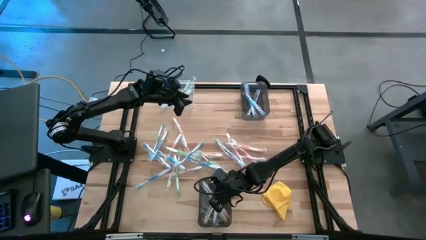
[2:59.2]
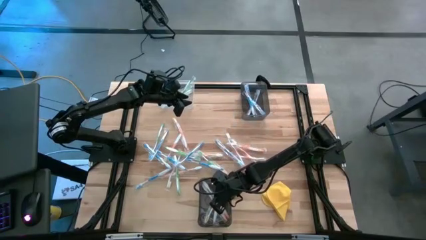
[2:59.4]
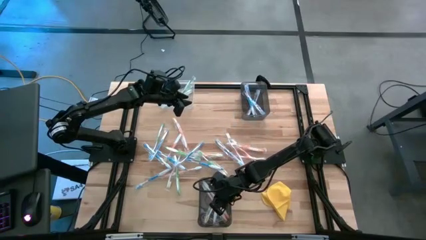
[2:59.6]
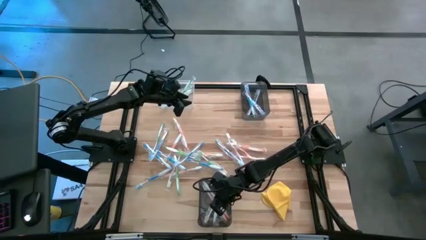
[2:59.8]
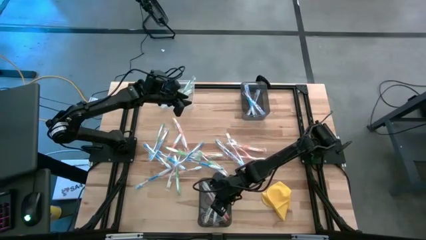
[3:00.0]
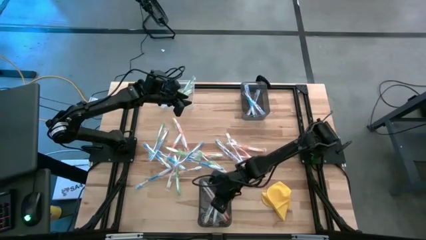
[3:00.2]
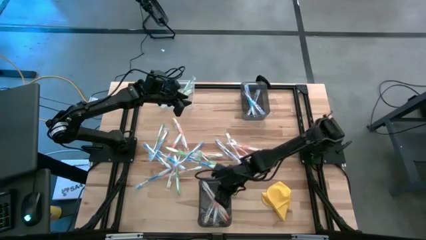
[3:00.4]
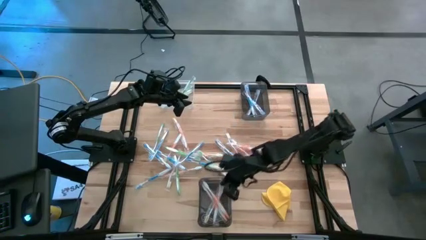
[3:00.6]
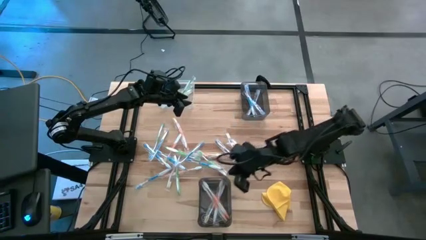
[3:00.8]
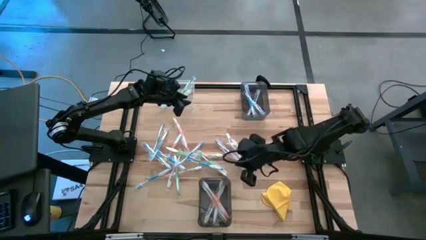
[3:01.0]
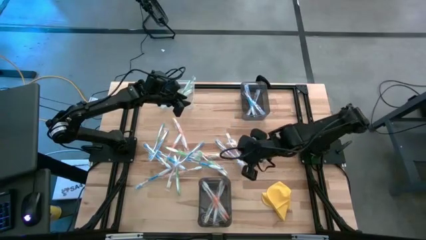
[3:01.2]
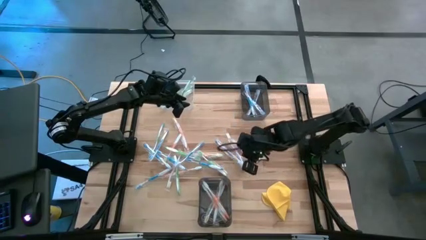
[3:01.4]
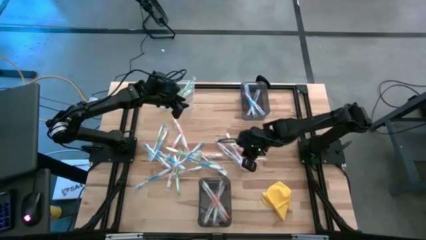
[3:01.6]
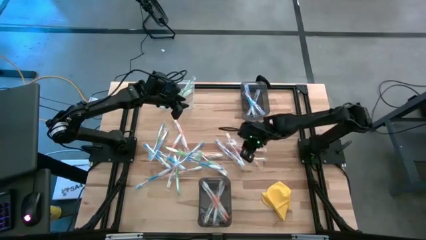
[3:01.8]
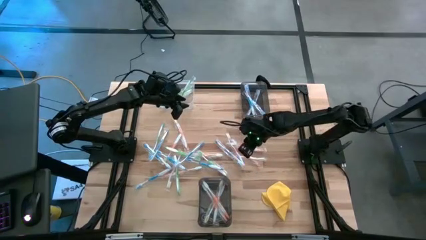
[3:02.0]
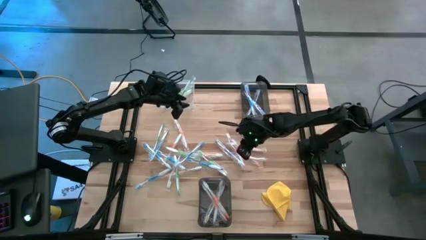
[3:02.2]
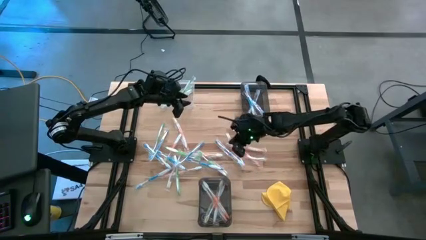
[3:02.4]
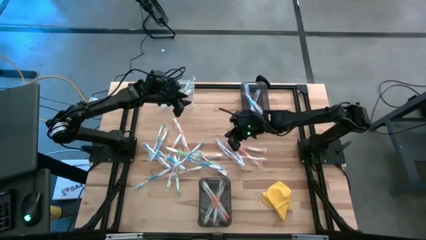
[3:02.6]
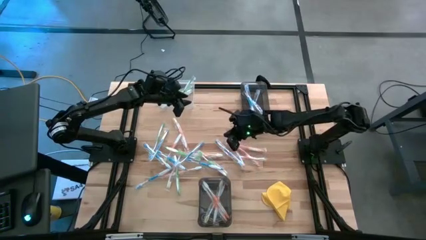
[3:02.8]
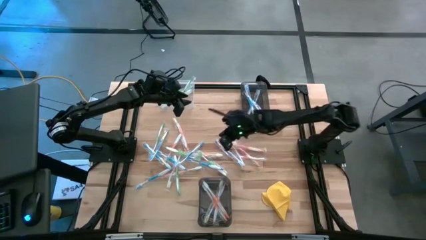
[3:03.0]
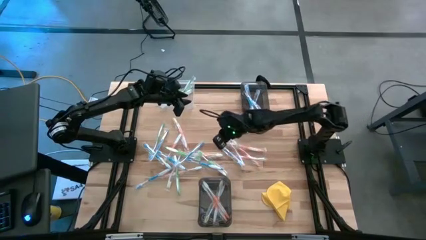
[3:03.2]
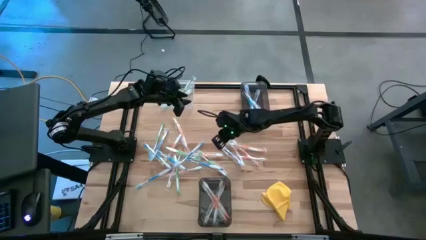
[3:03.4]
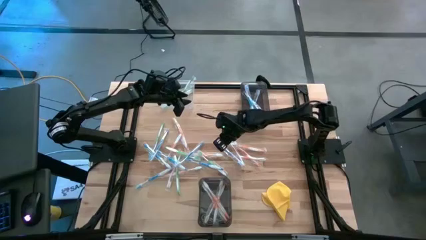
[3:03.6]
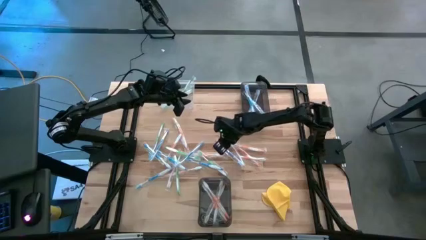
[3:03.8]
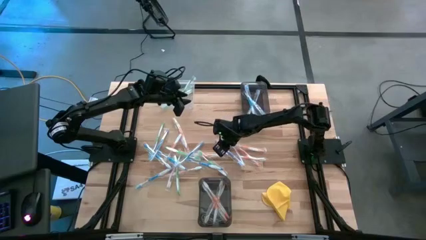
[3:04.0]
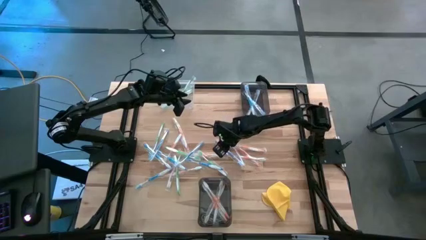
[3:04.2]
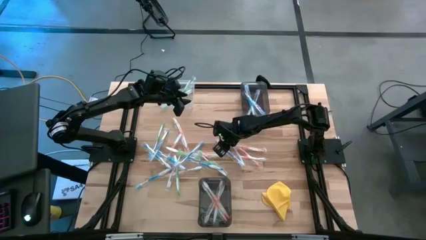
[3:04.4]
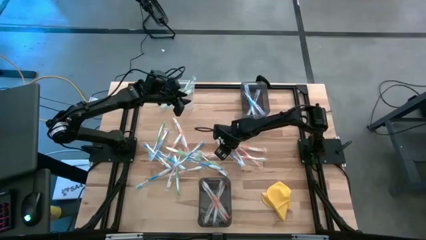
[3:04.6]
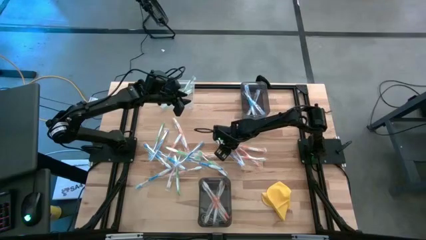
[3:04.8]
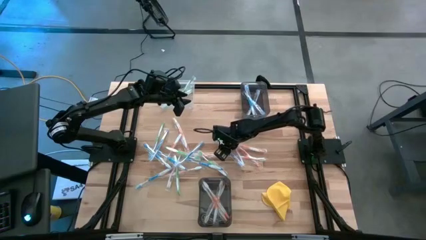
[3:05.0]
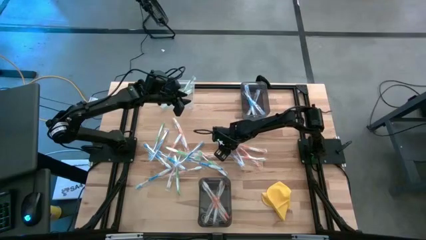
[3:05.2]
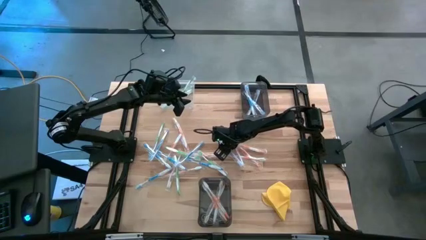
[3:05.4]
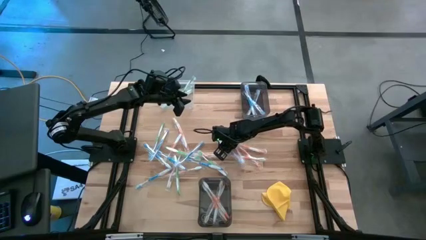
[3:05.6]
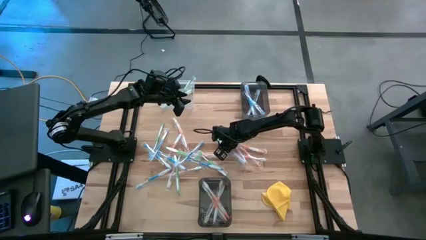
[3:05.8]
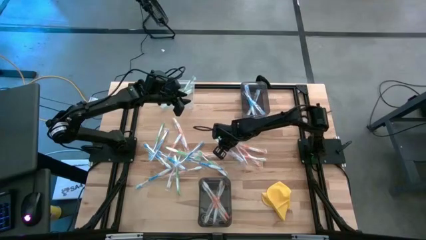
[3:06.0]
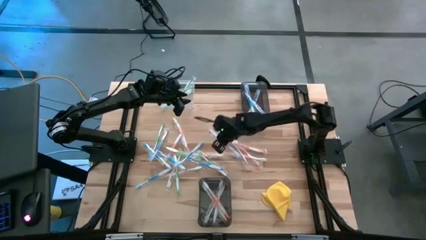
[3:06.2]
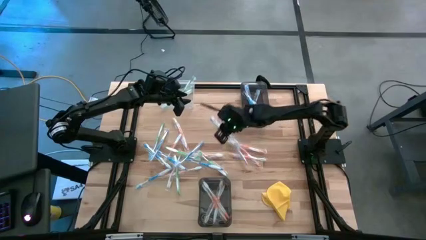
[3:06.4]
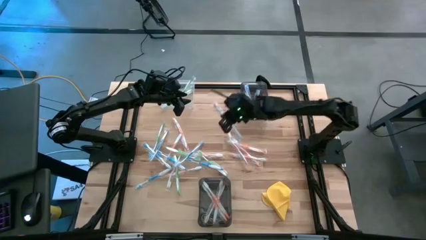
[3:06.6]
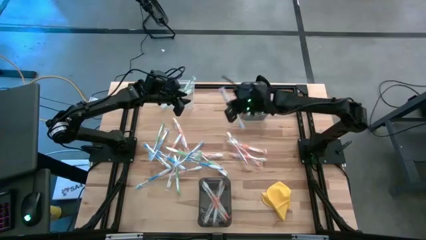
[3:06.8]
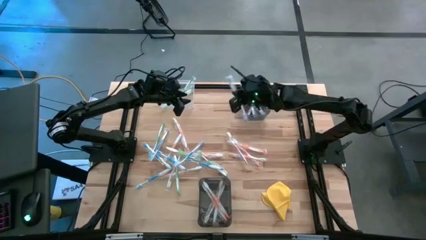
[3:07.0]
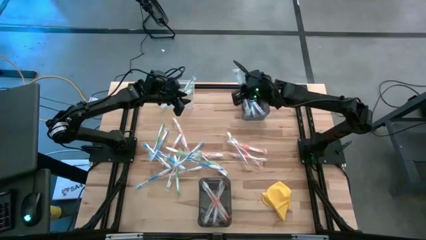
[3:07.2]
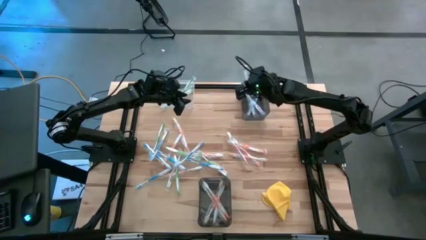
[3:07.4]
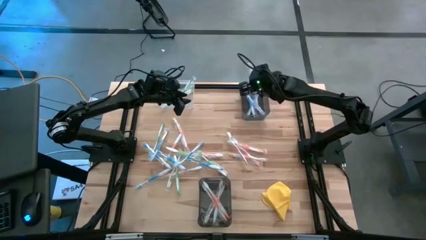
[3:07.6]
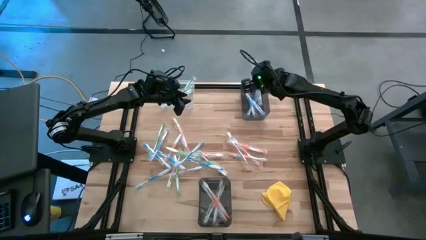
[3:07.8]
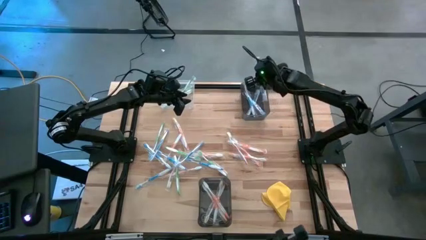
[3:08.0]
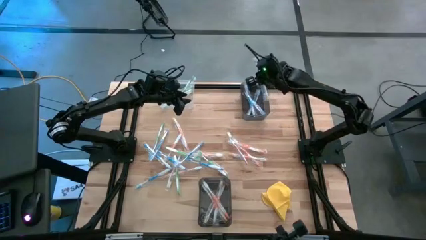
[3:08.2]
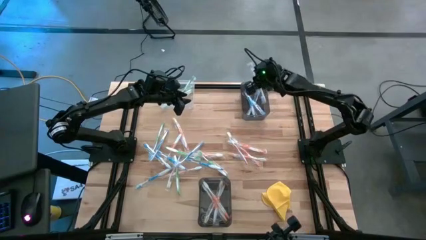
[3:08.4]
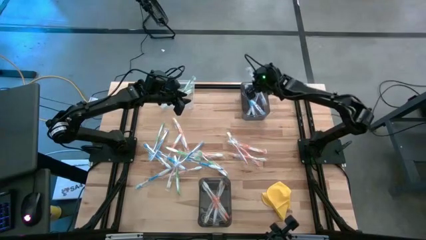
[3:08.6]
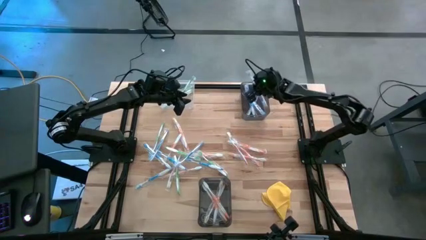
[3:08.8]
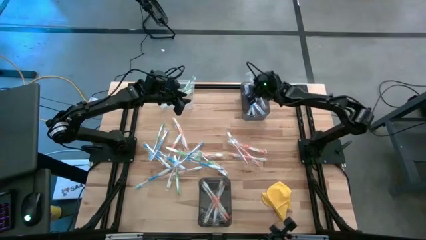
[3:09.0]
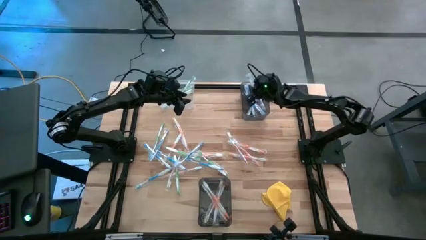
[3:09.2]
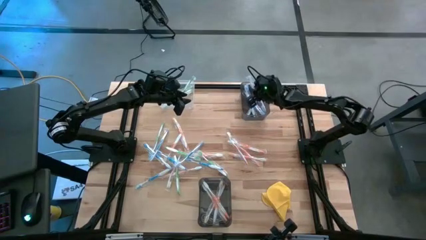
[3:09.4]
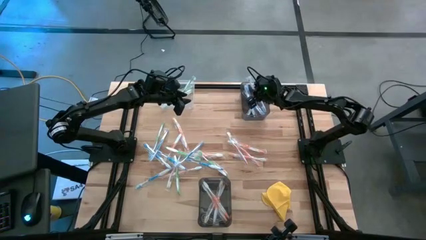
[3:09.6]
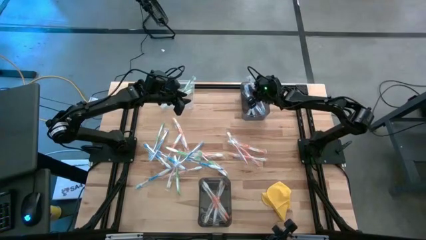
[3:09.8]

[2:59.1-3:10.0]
Task: Pick & Place Toothbrushes
Put the blue toothbrush into the top black bin

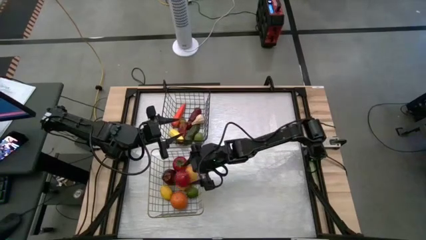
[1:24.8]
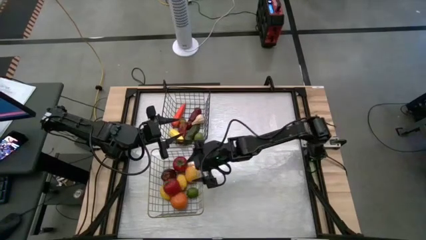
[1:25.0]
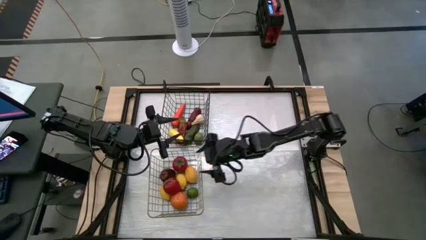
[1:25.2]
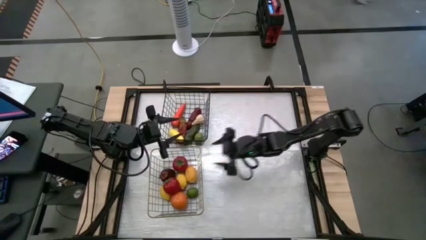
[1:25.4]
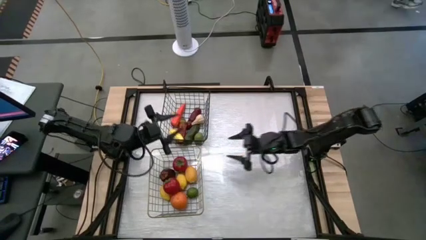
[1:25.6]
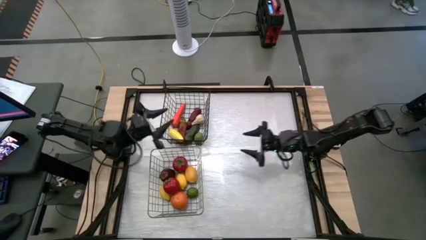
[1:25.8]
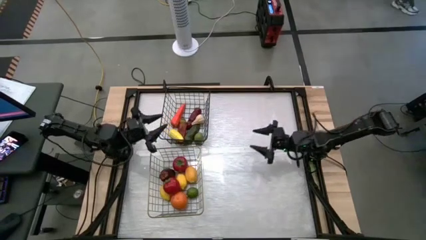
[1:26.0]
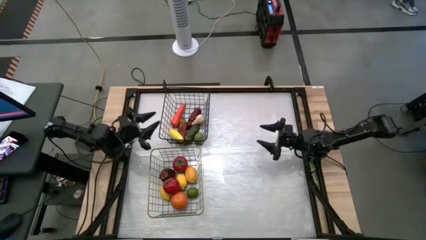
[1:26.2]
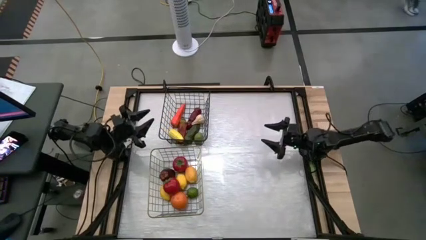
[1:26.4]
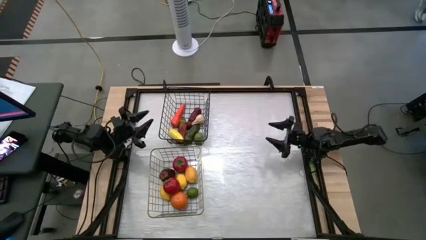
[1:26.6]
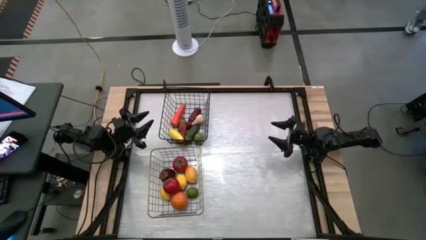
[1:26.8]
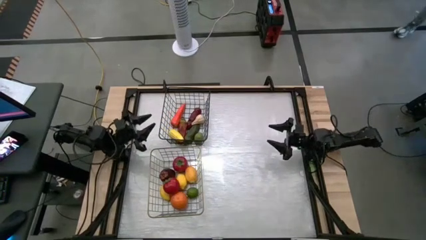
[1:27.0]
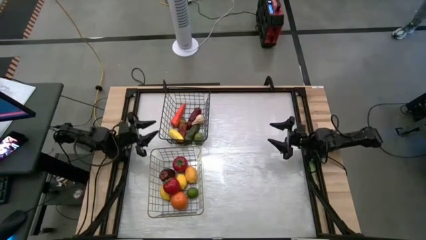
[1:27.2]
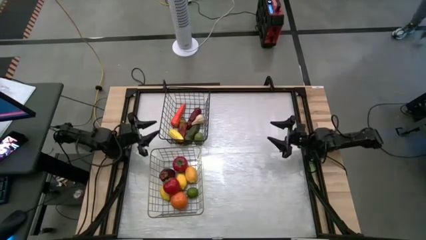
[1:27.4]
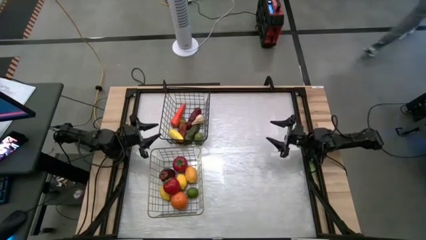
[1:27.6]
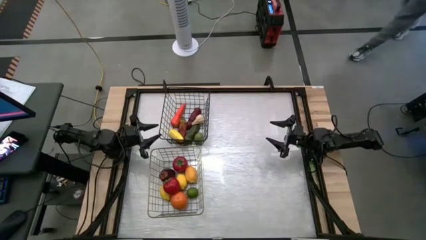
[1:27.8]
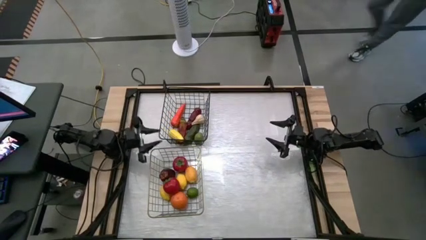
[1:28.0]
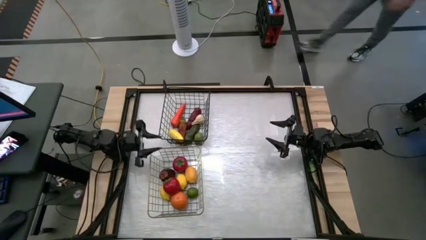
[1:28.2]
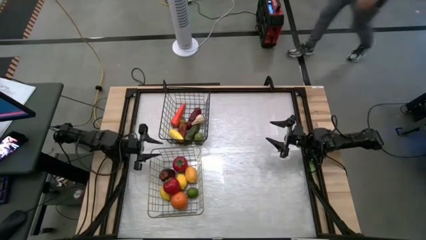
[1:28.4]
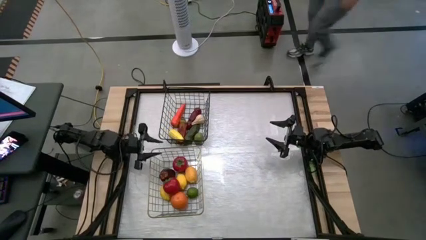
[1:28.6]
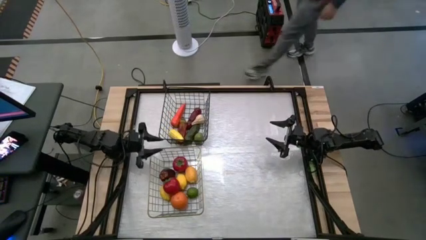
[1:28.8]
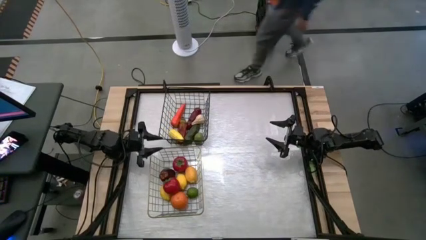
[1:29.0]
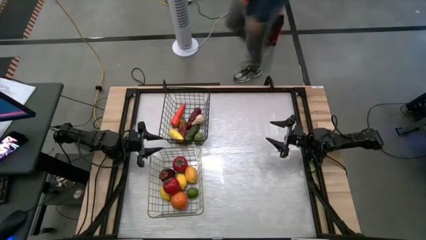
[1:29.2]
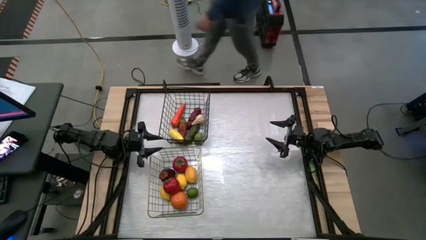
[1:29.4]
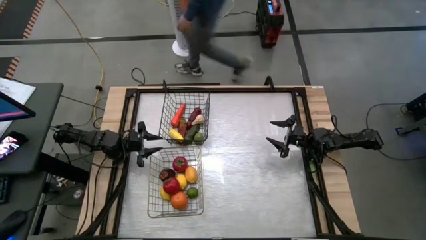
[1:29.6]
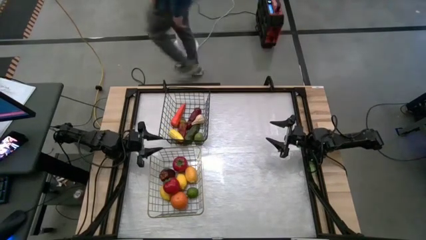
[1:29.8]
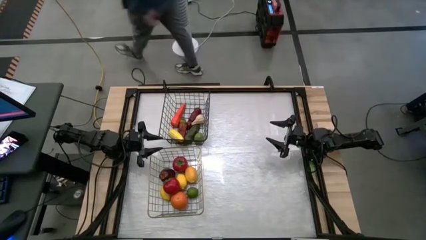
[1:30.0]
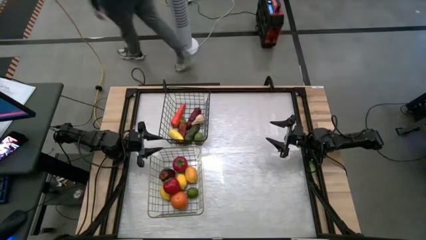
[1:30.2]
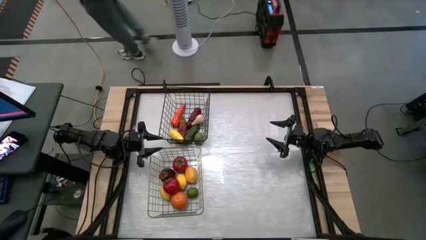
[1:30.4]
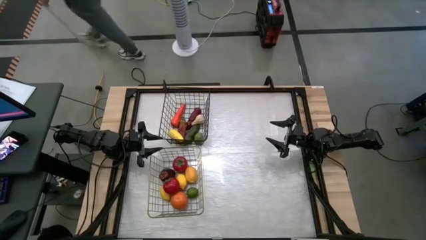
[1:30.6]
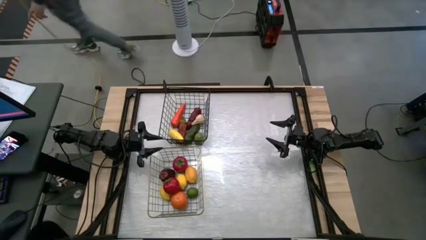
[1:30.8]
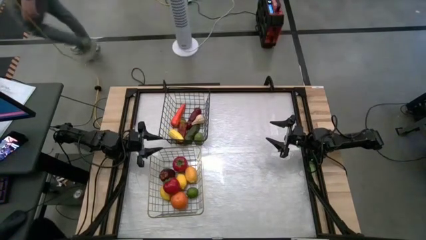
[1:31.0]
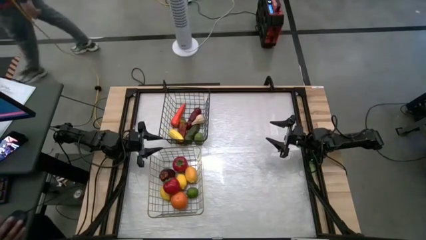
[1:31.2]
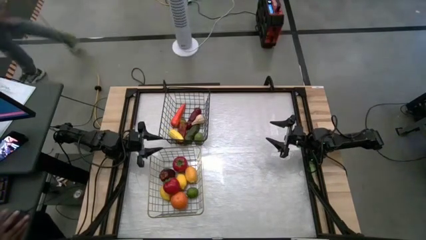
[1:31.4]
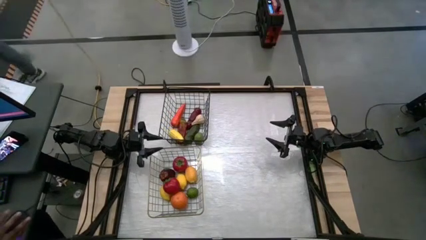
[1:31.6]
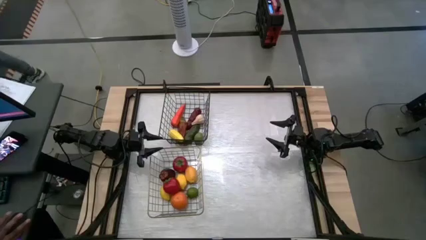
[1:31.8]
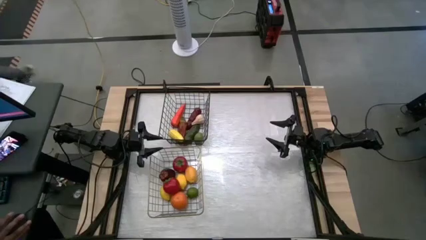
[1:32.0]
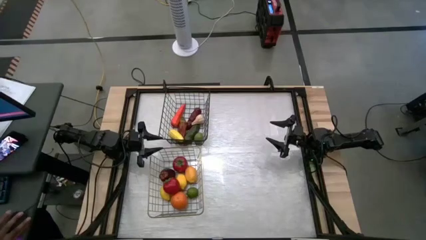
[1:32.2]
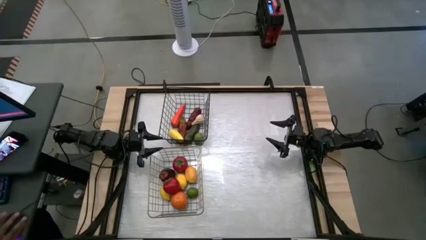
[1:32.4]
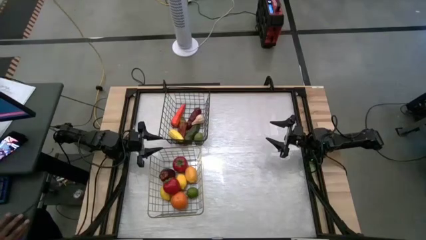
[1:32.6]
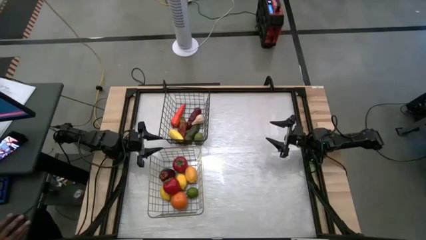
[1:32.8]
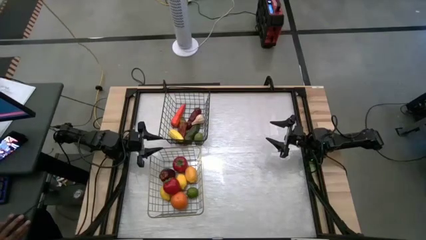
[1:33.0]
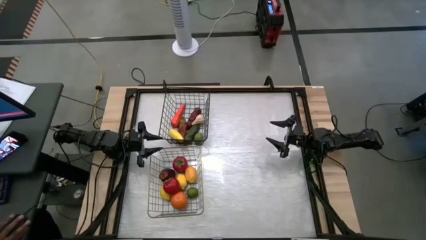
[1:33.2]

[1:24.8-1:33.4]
Task: Sort produce into baskets
Return to Home Position
